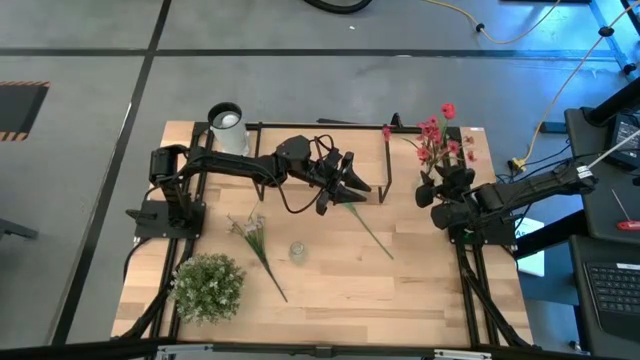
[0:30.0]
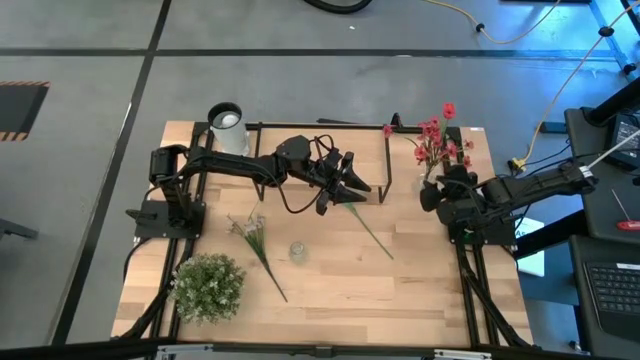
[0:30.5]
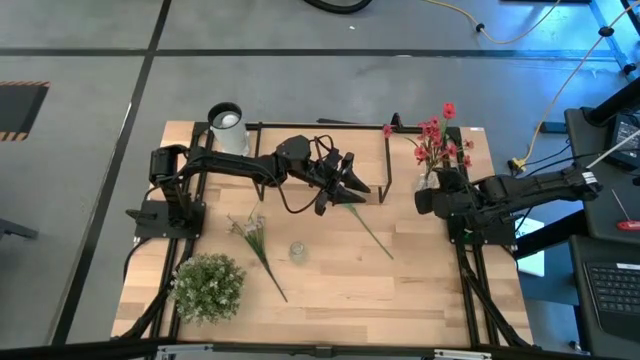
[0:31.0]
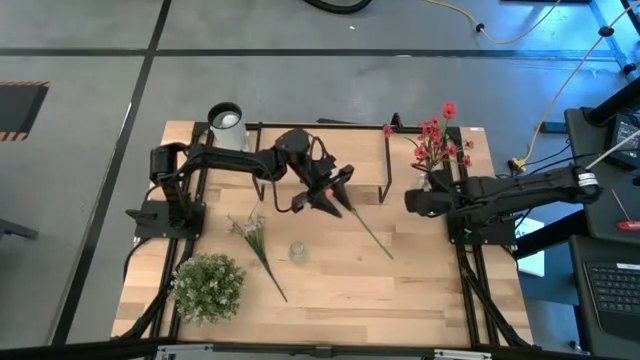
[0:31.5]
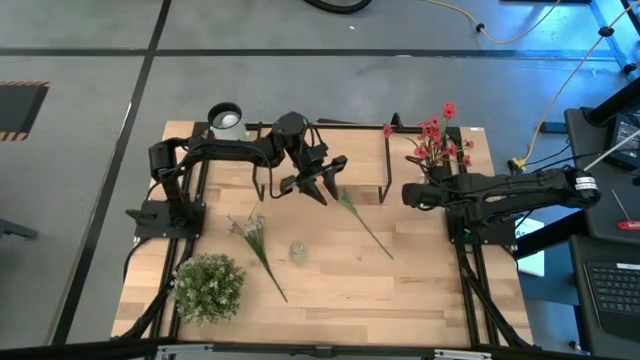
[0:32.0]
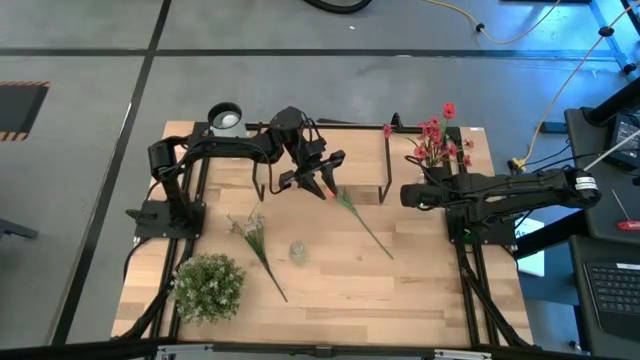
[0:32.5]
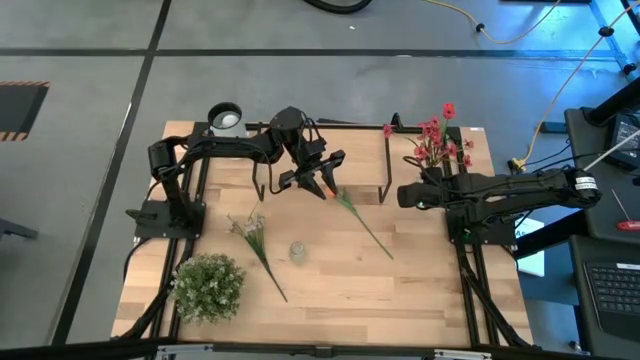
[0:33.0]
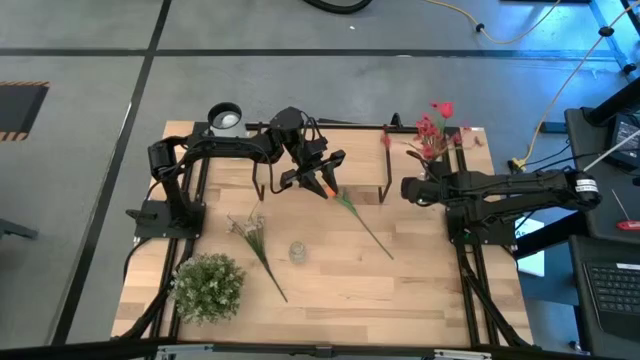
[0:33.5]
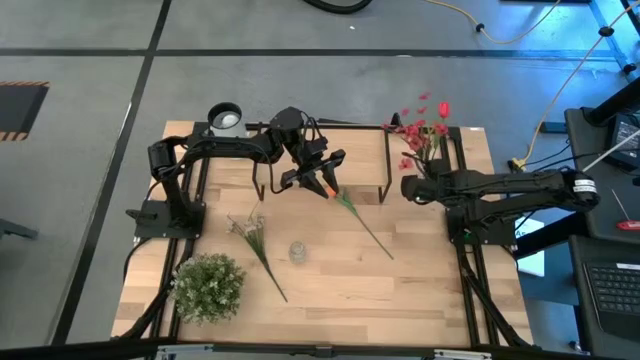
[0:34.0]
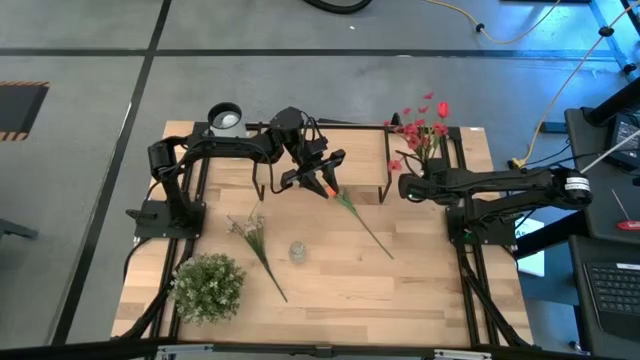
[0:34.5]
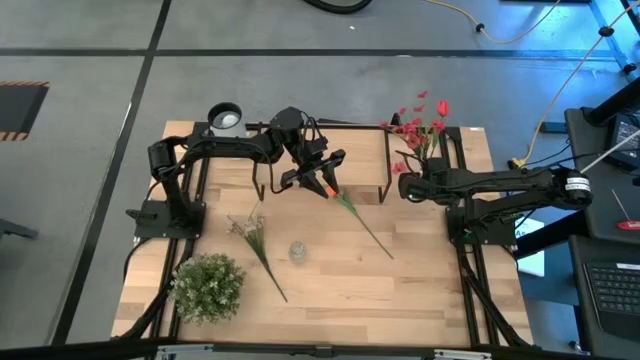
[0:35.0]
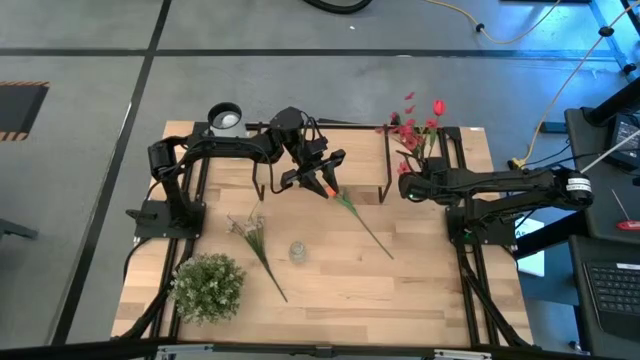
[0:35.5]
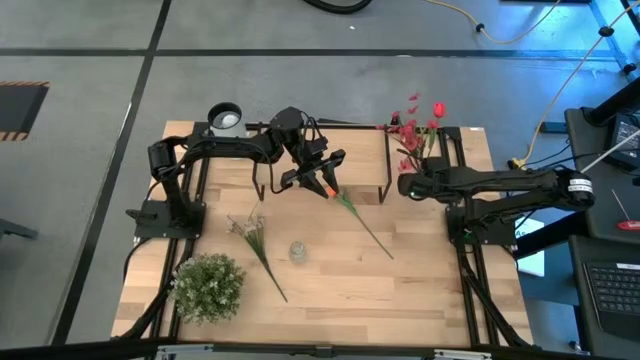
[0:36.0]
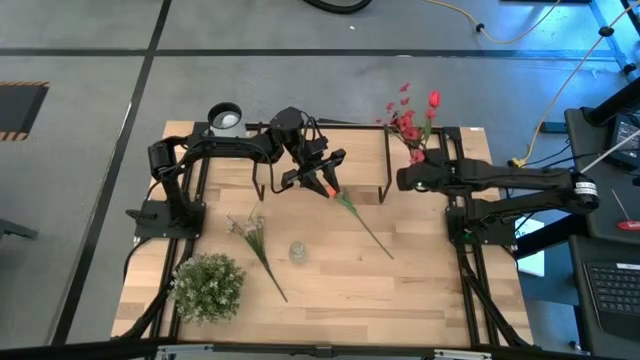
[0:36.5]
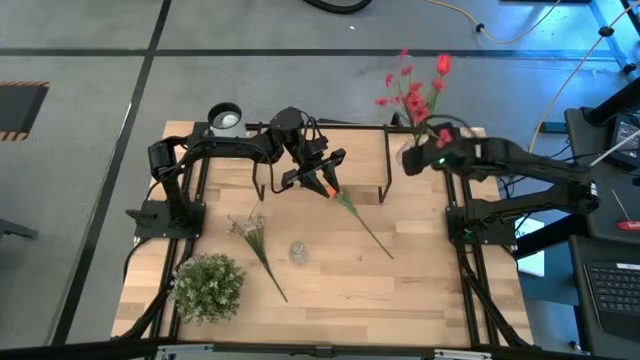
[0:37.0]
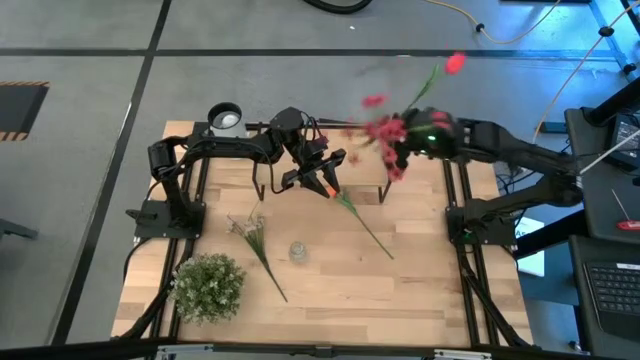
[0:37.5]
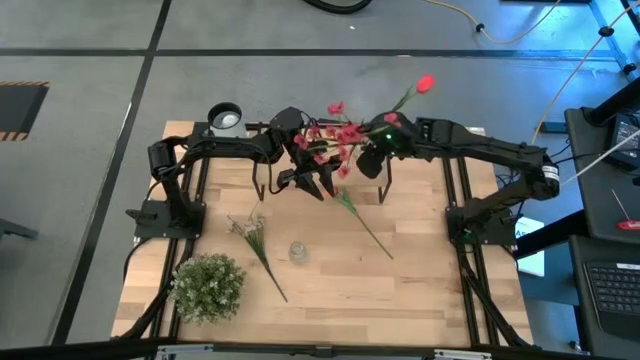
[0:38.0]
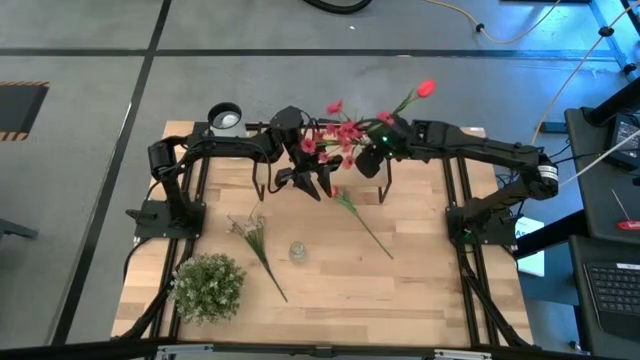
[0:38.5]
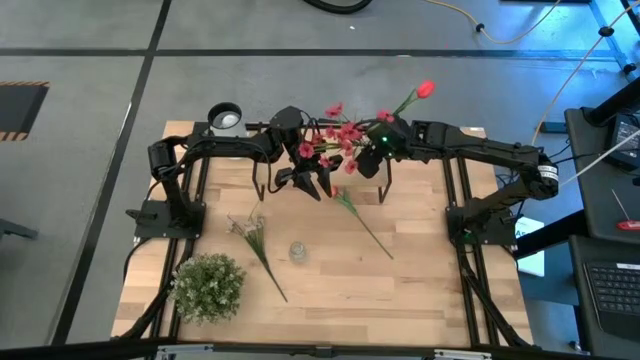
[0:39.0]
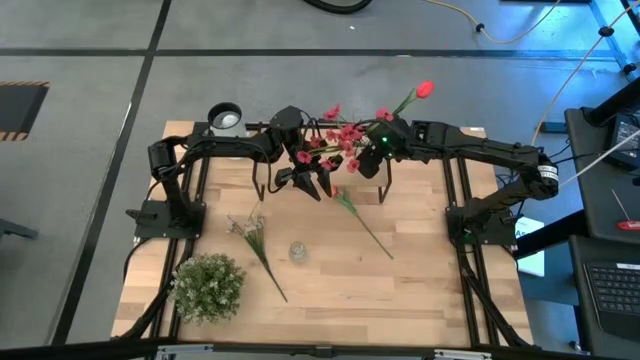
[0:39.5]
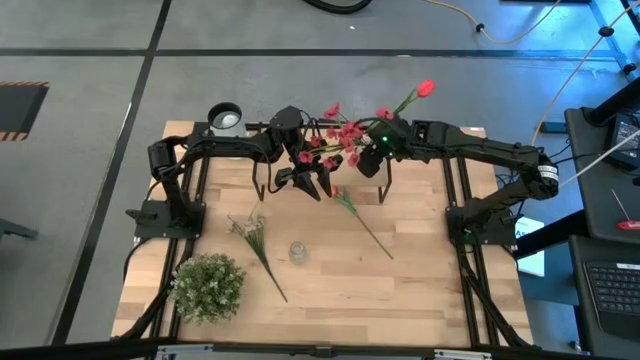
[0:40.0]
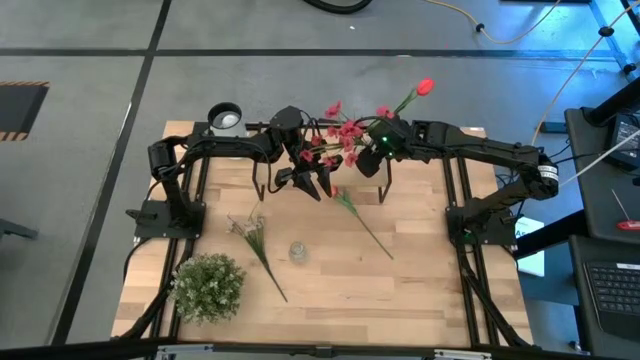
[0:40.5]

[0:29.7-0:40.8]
Task: Pick and place flowers into a vace then onto a shelf
Put the top transparent vase on the shelf

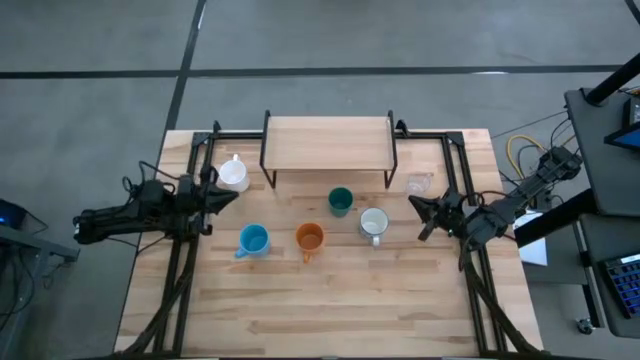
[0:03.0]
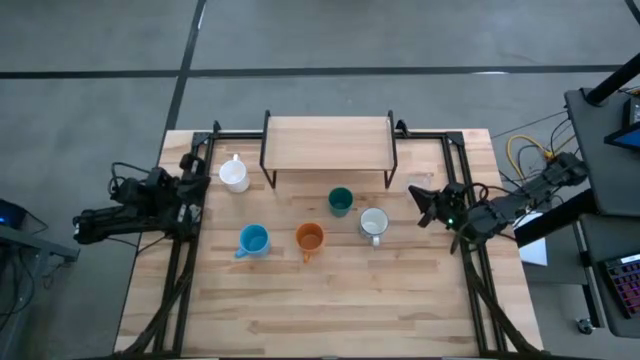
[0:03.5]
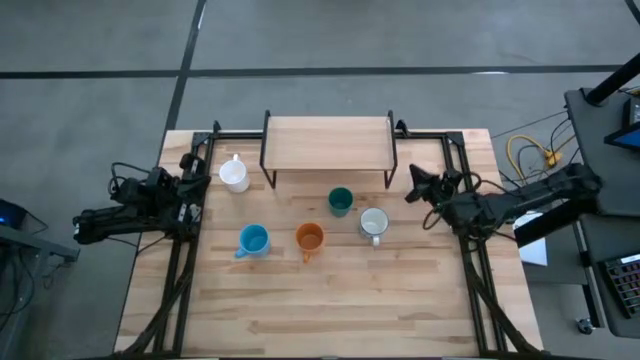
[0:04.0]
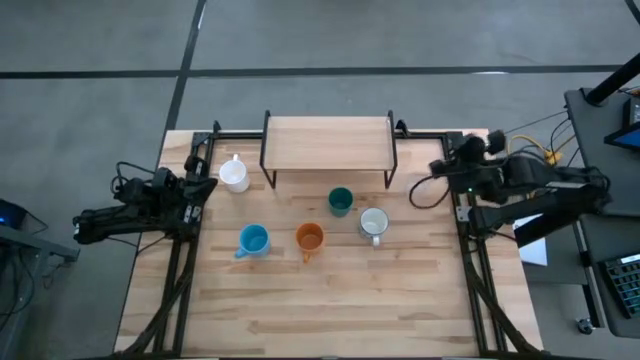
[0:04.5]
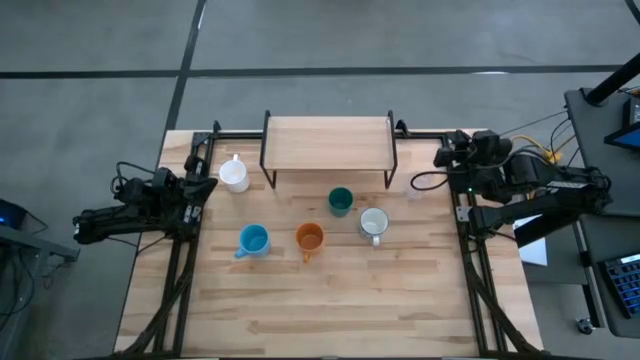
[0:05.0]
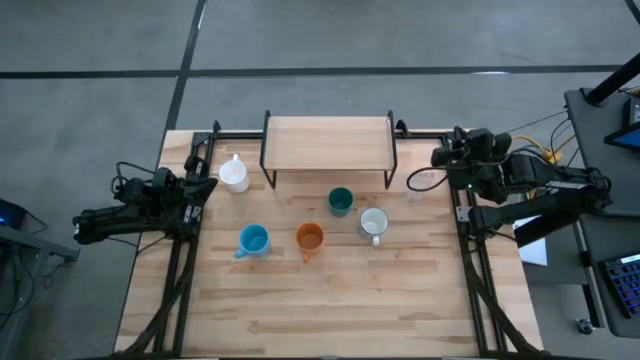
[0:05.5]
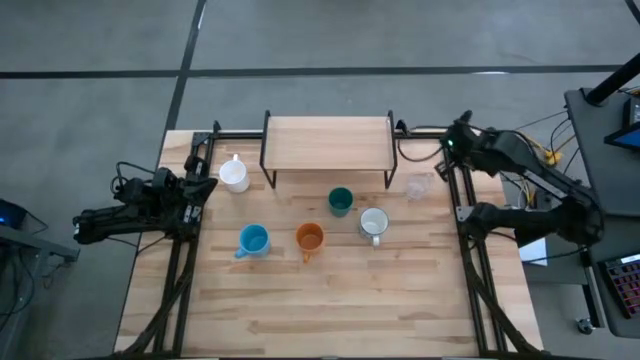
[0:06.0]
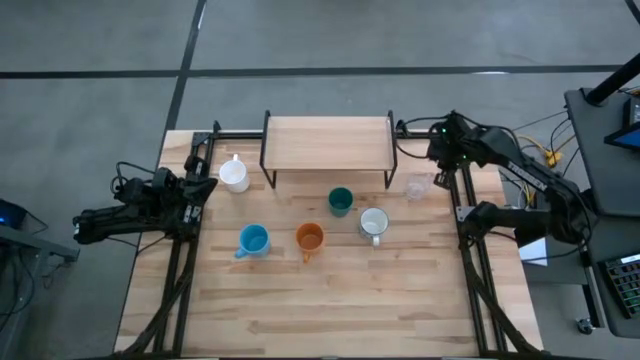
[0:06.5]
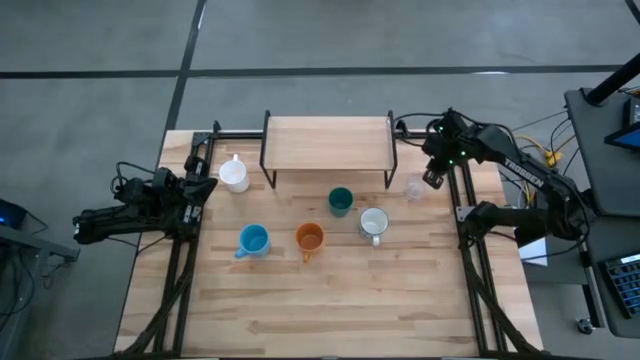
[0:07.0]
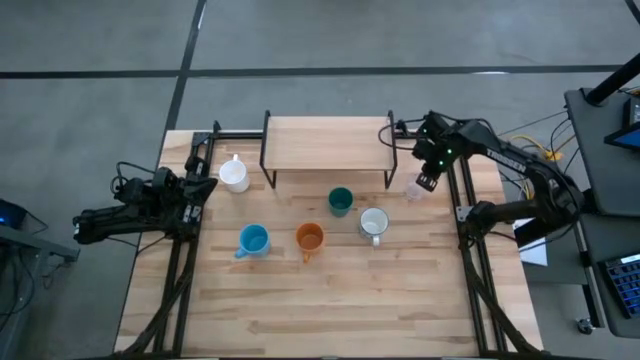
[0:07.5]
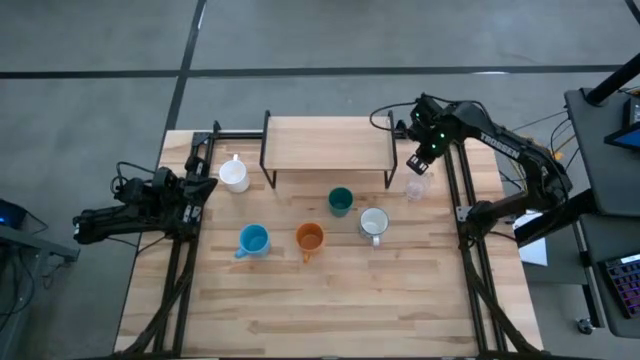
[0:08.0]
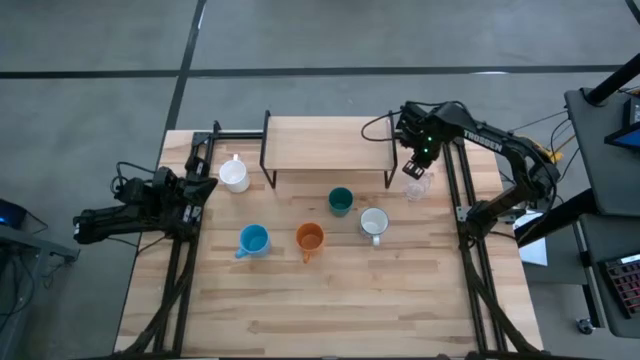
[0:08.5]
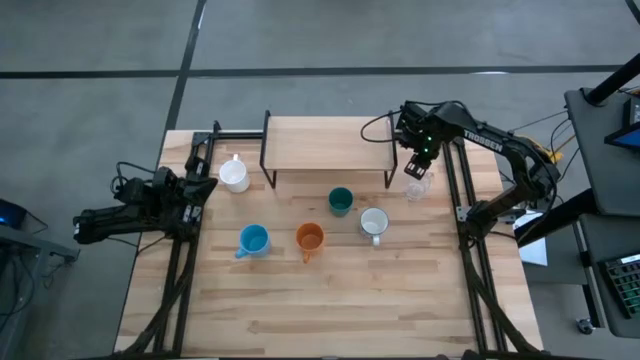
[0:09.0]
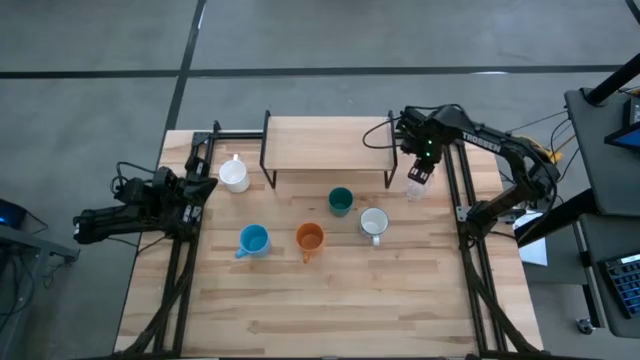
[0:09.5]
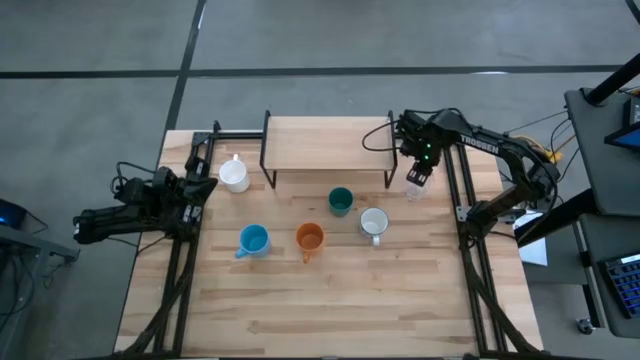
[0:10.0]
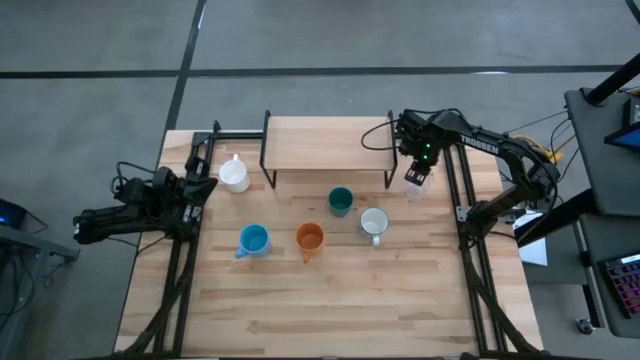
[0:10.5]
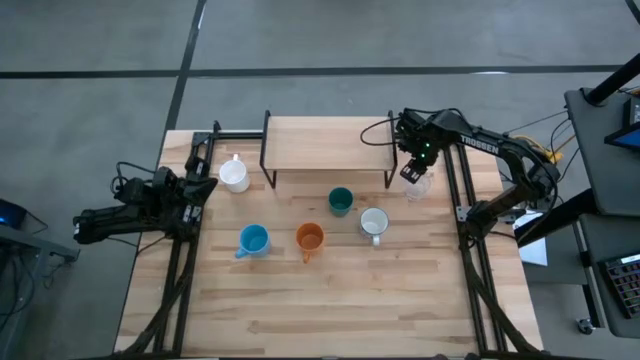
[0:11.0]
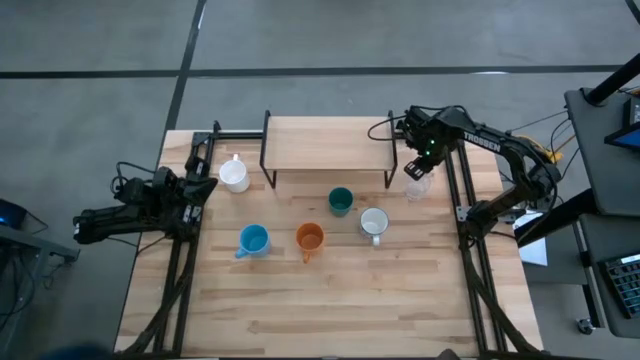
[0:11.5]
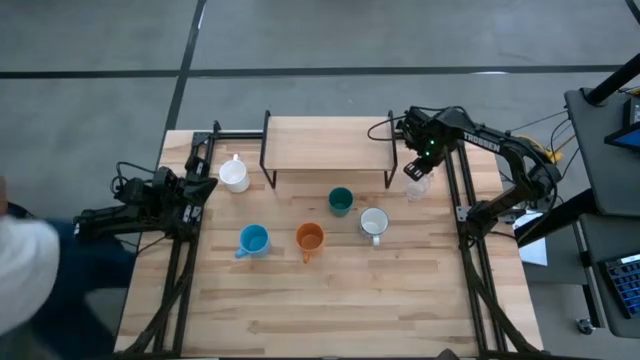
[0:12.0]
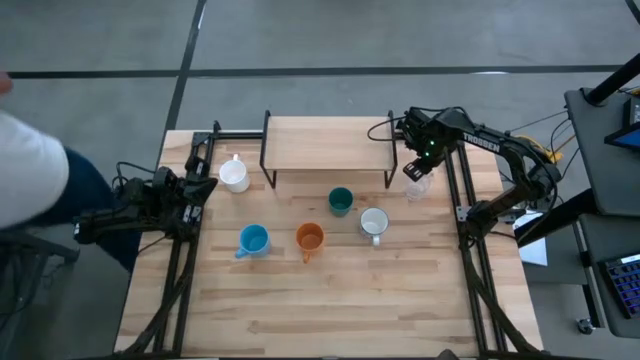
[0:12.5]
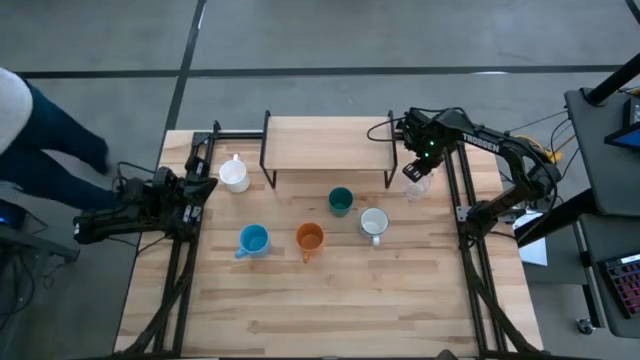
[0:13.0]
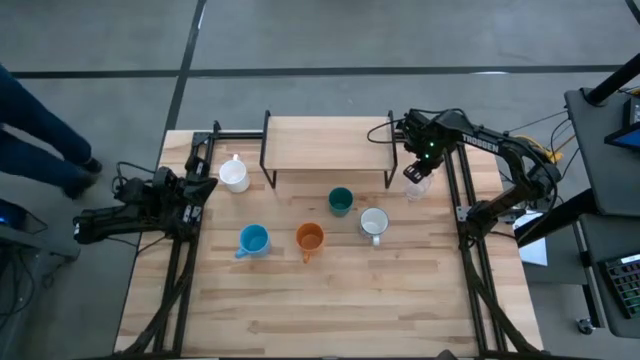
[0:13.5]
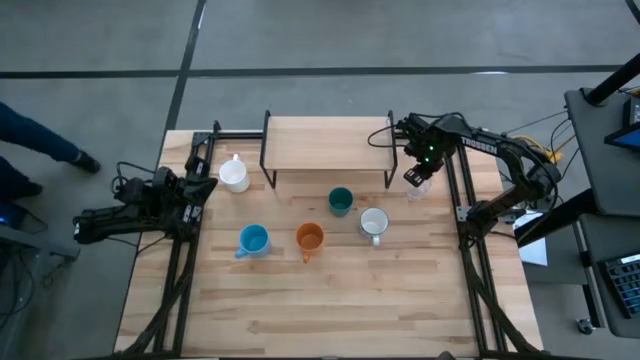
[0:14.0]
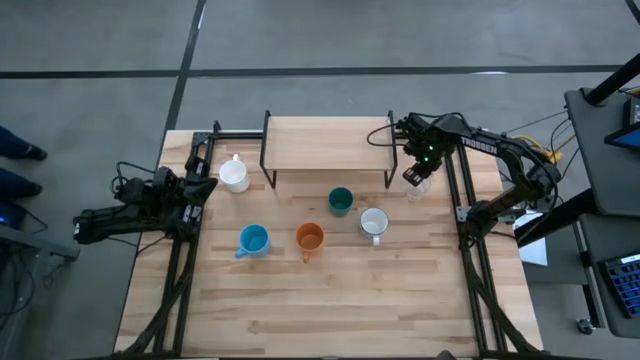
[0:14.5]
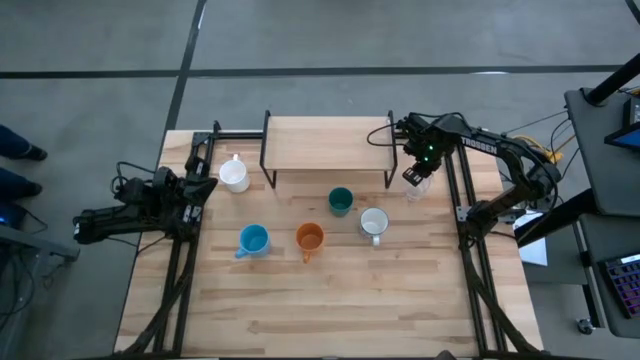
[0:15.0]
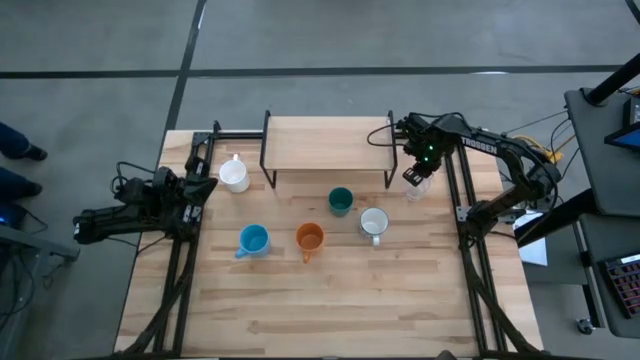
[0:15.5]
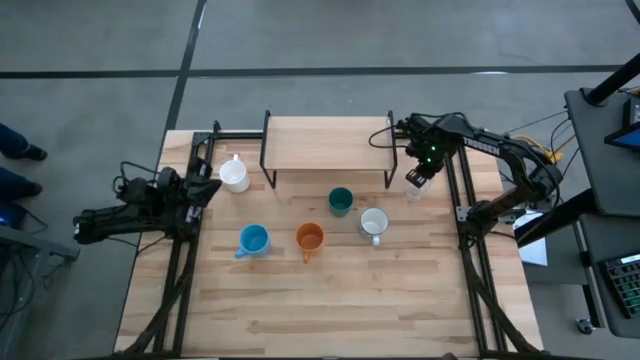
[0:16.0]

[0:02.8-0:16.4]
Task: Stack small to large cups/mugs on shelf
Put the transparent mug on the shelf
